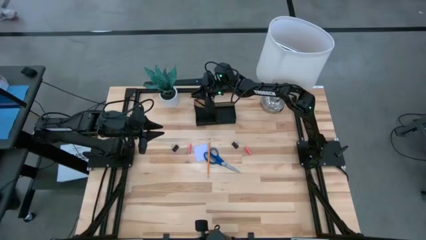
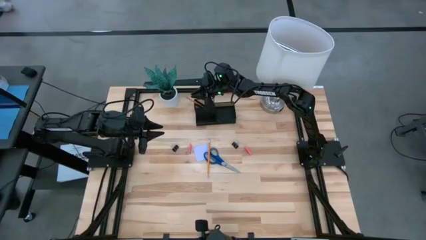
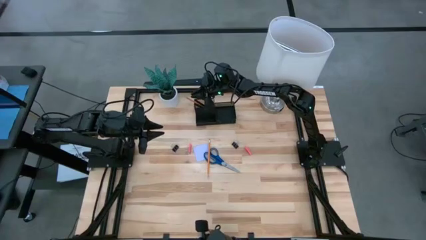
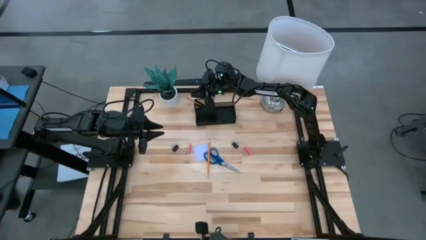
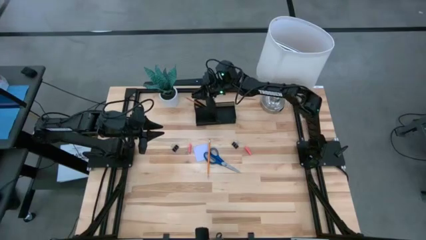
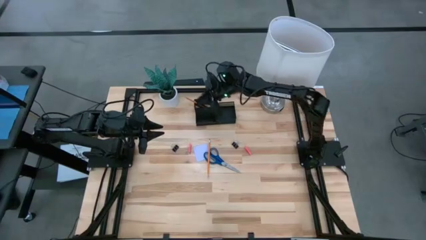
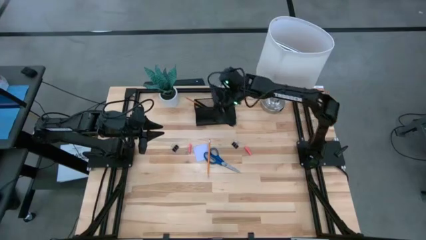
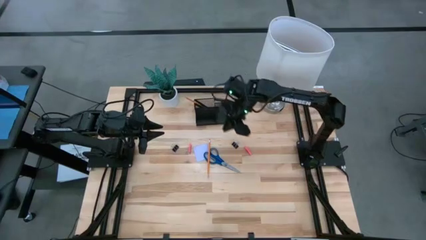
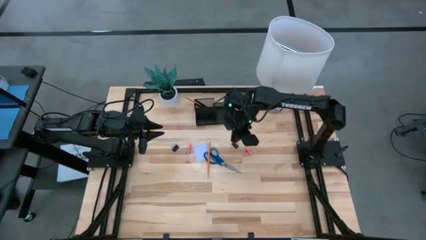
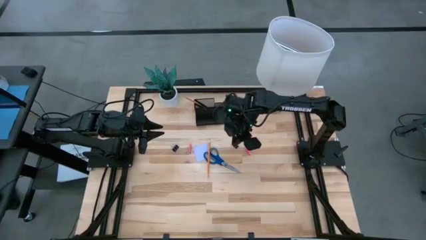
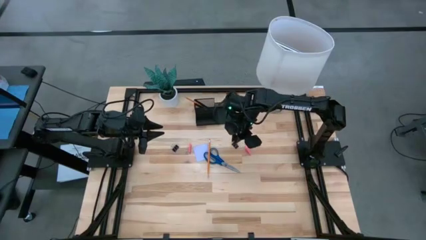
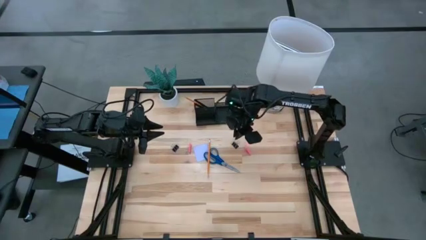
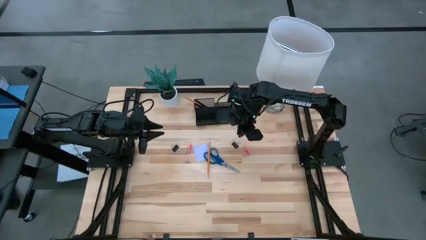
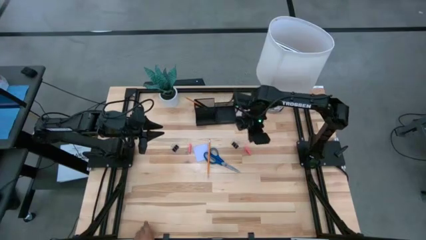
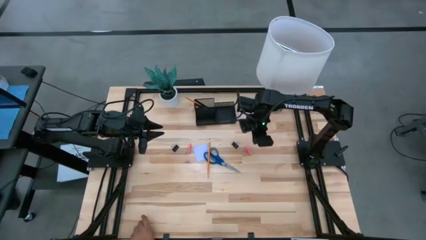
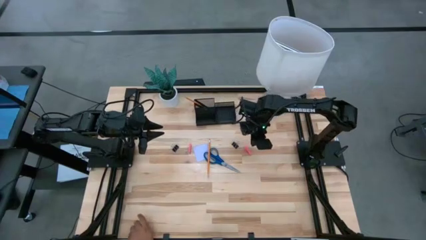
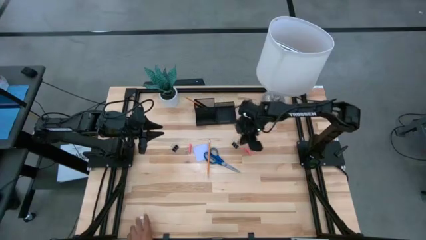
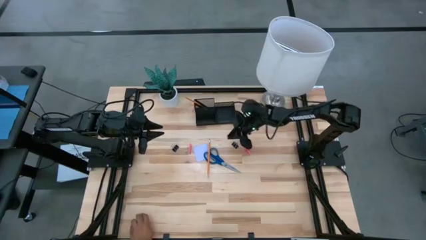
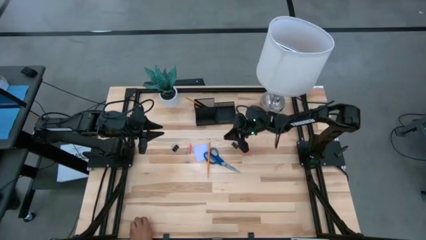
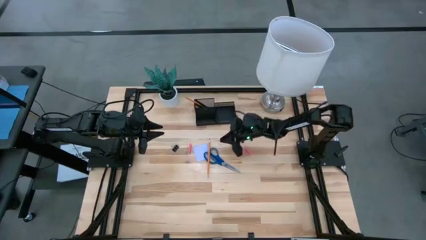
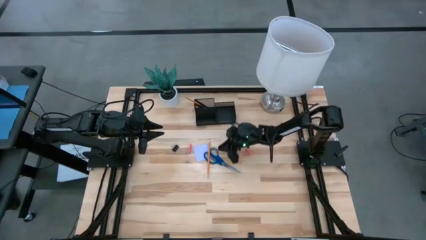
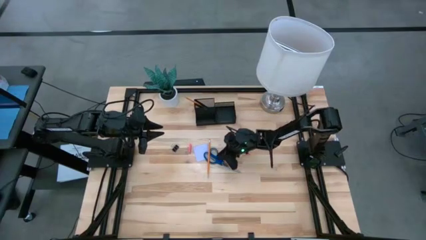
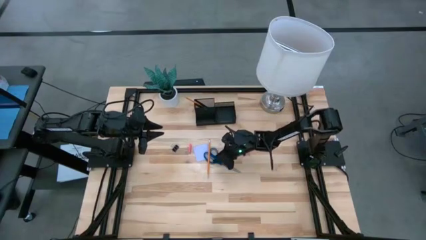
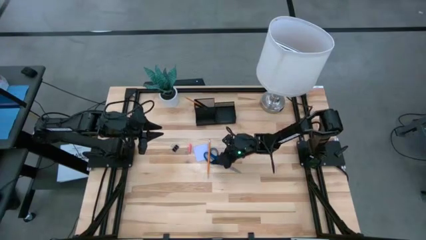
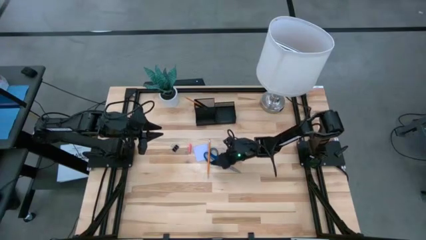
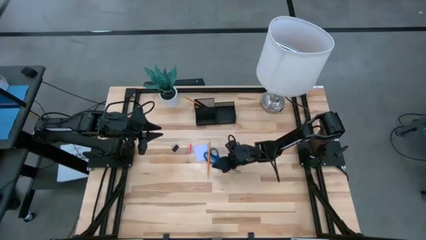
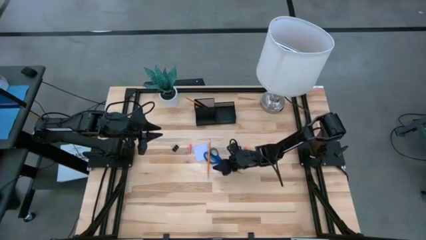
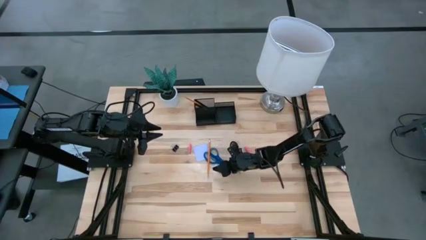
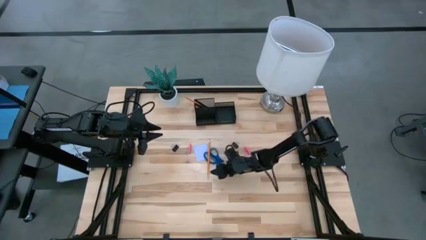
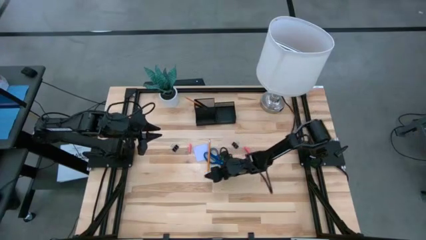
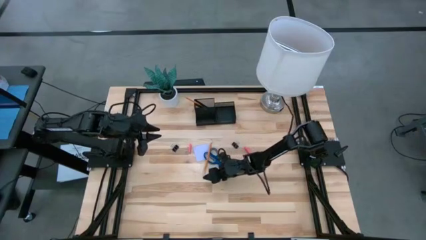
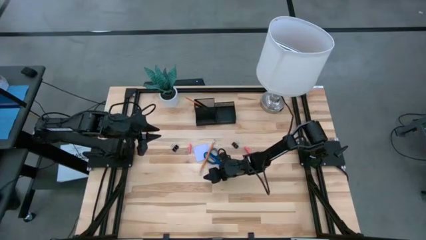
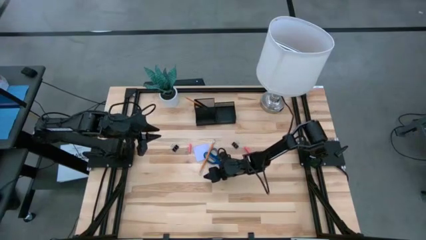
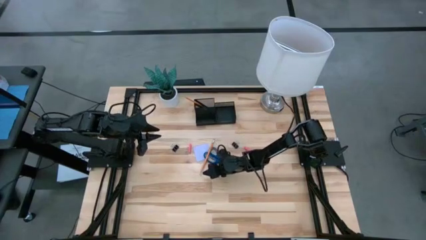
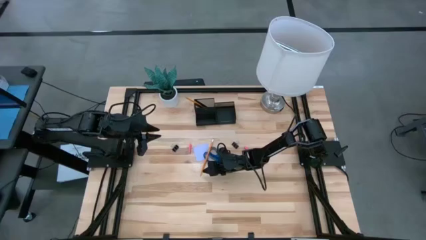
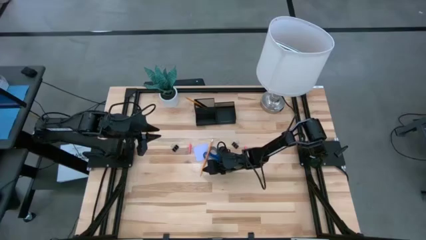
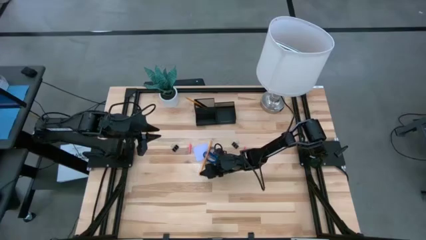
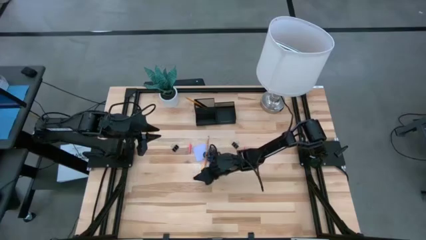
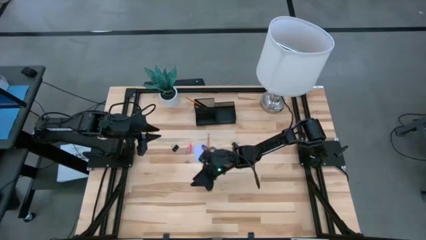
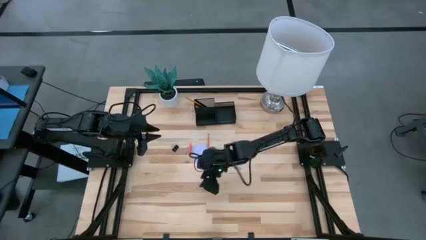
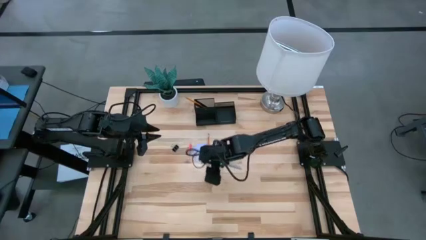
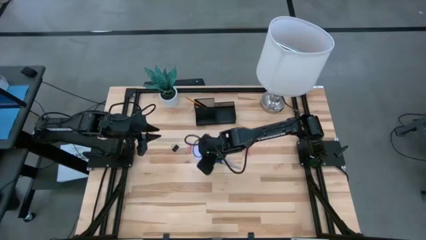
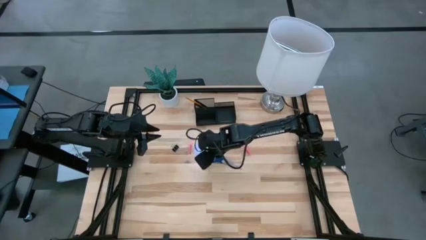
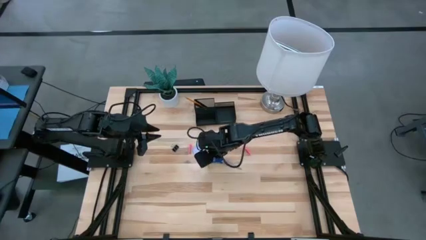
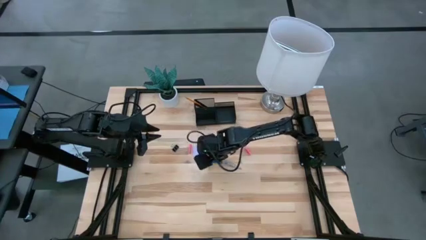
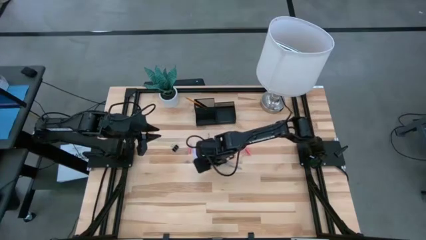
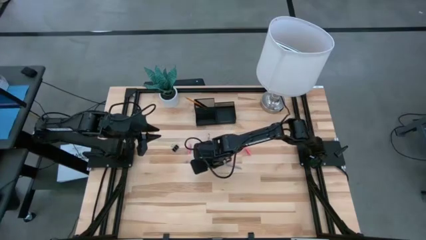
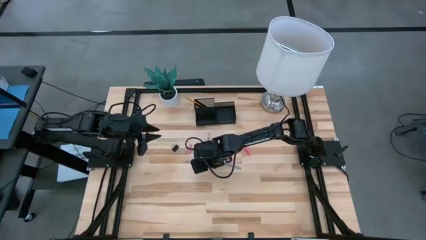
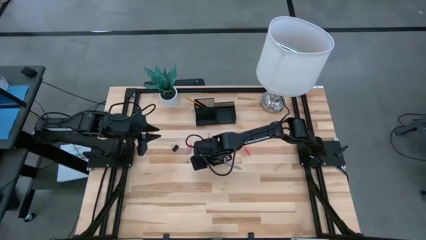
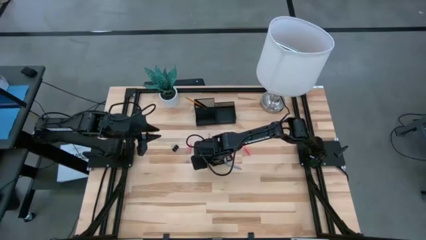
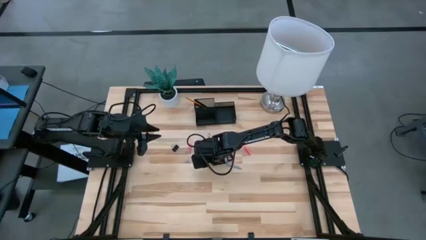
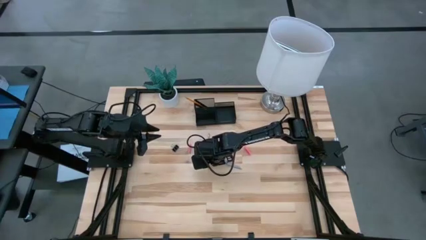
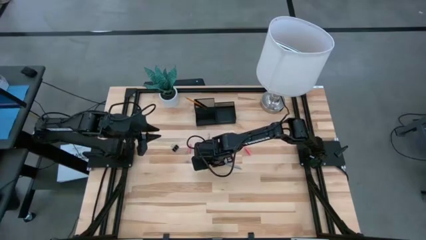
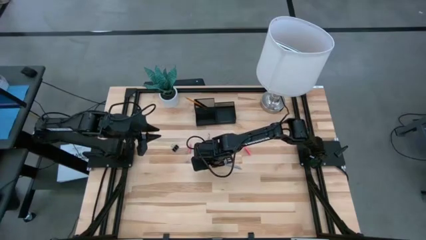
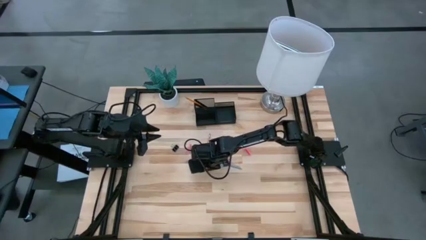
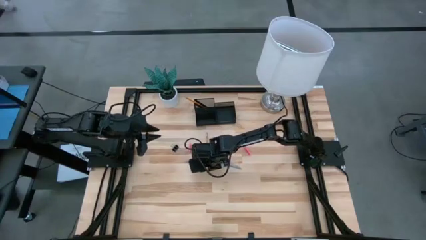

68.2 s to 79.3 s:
Task: Pick and place office supplies into organizer
Put the pencil into the desk organizer
